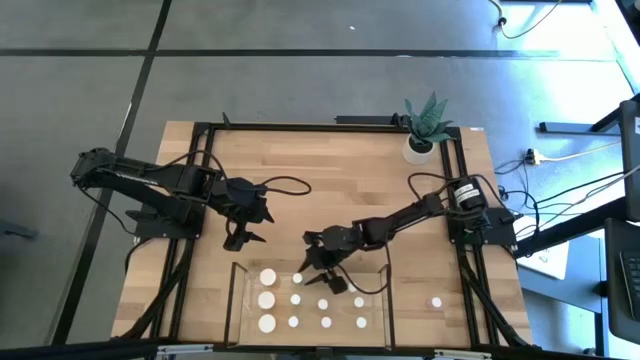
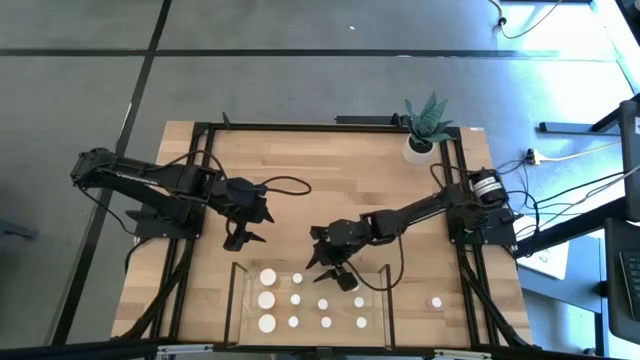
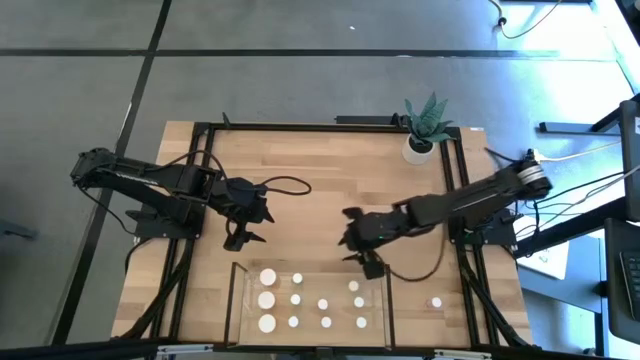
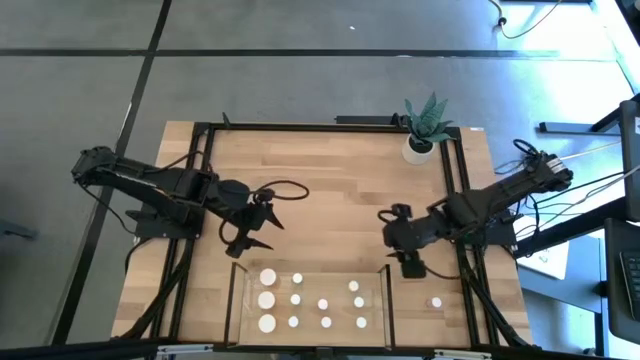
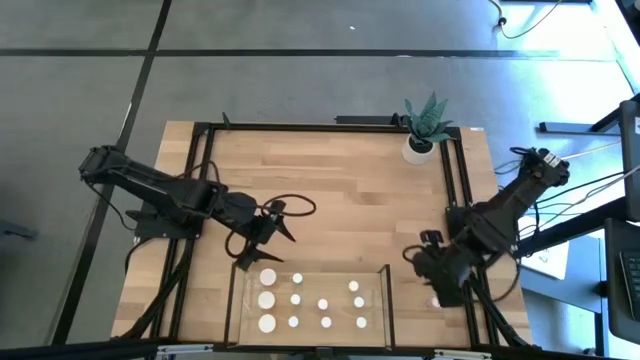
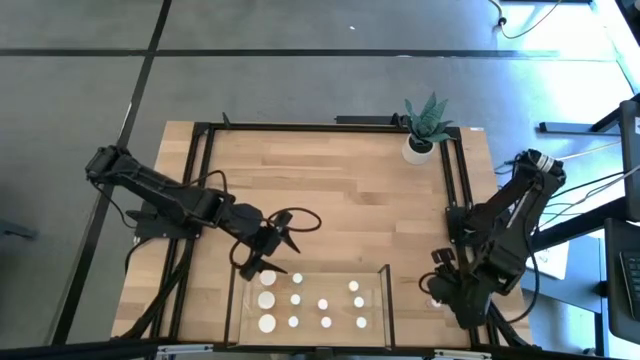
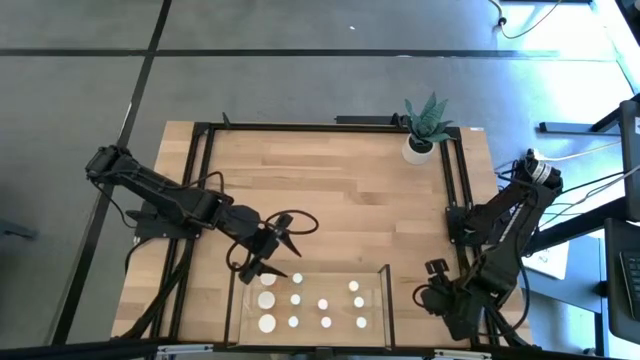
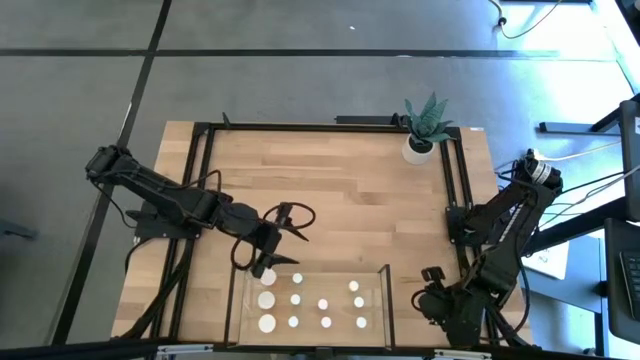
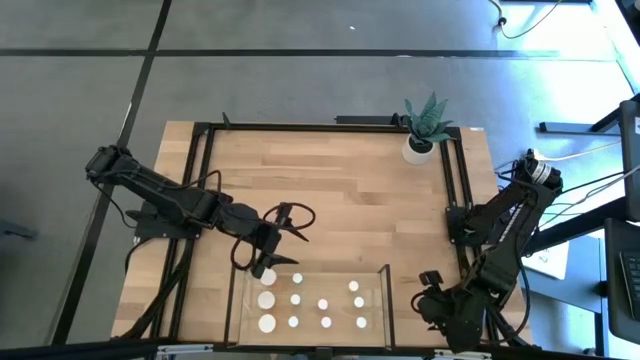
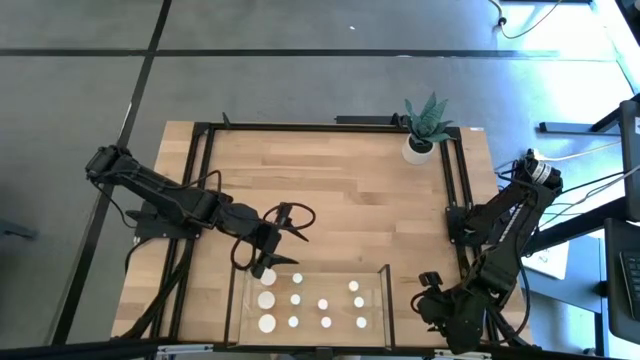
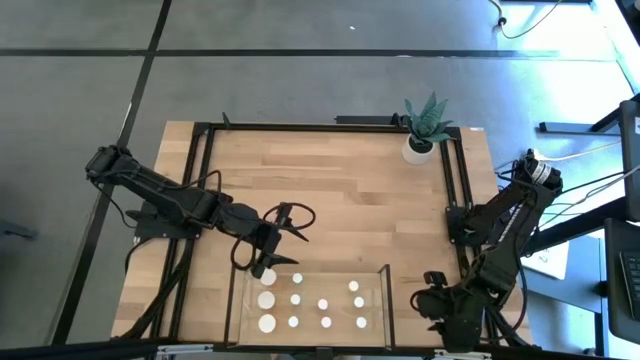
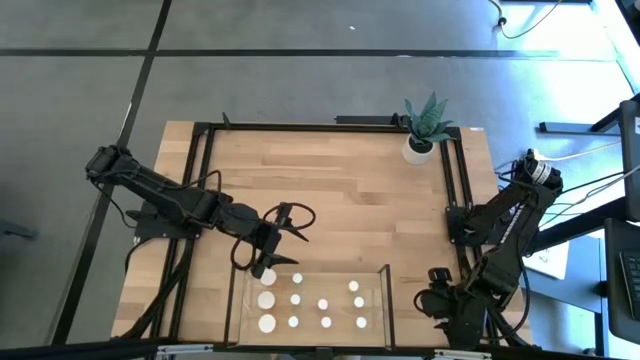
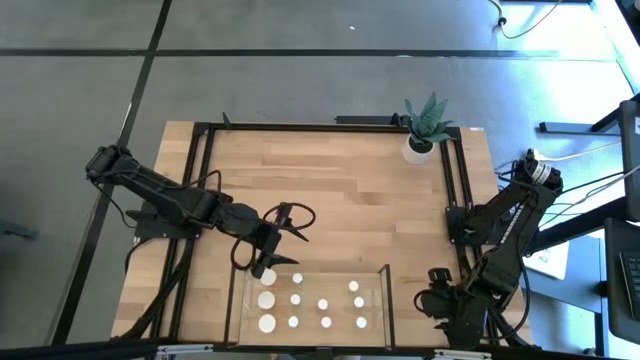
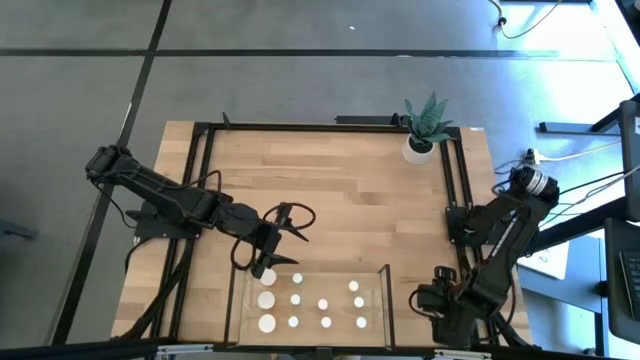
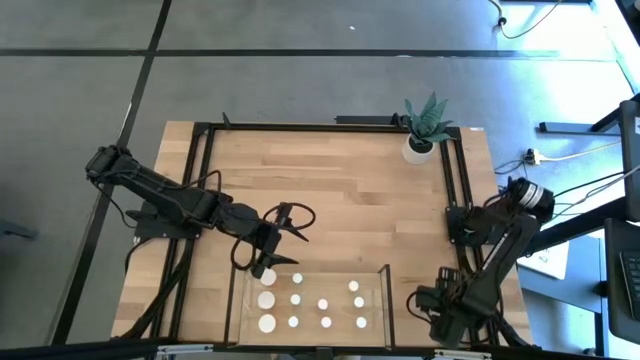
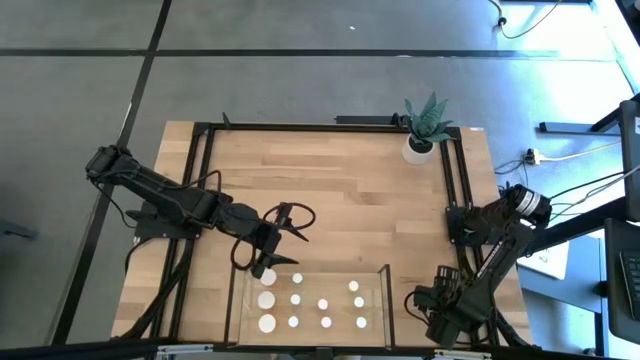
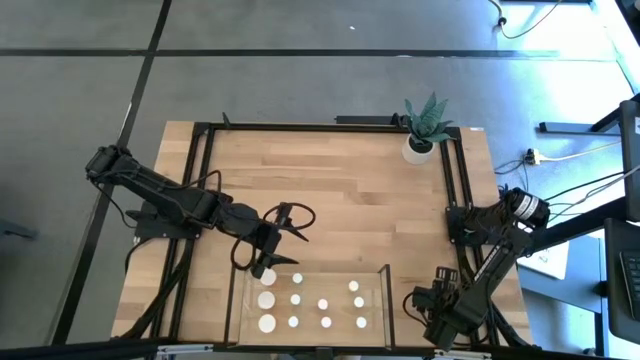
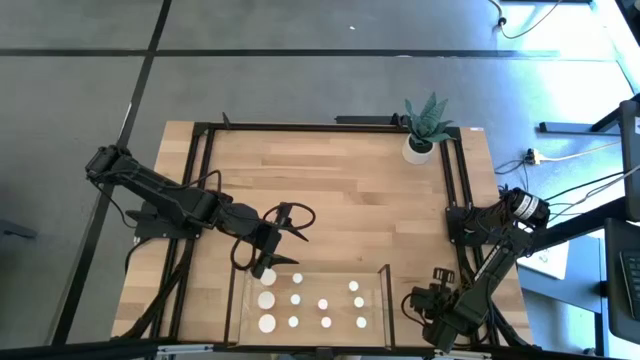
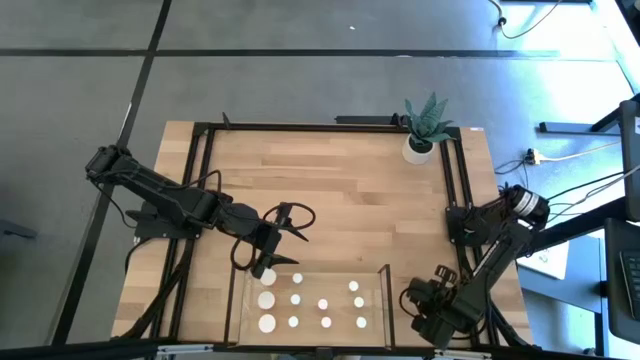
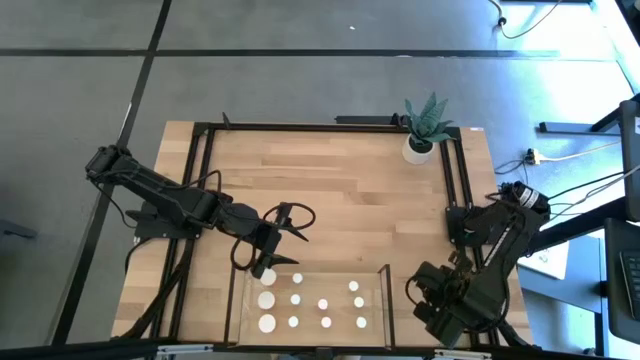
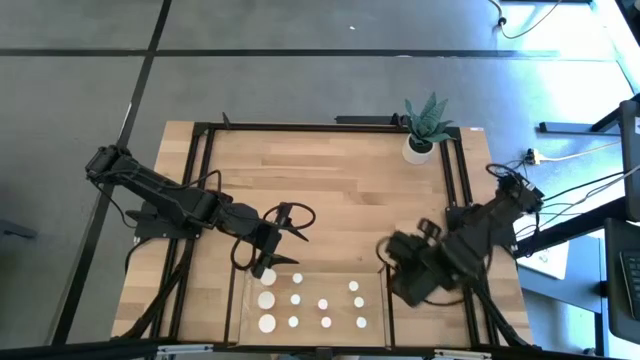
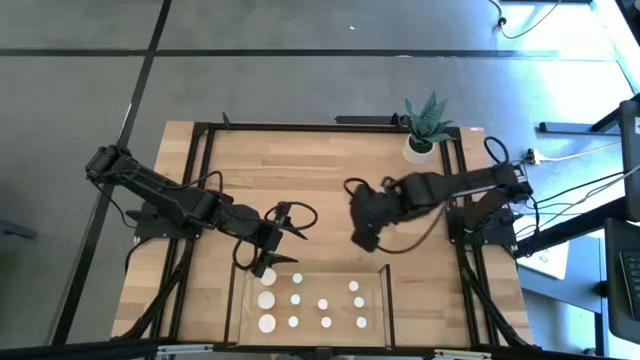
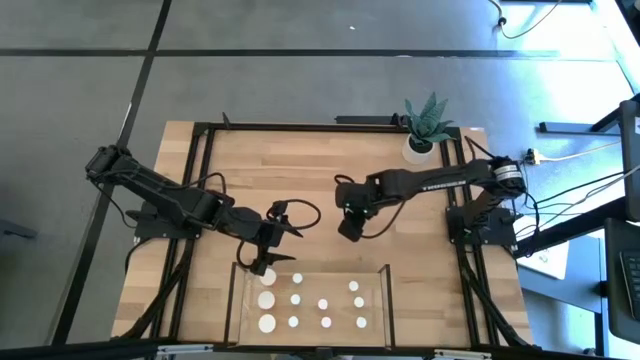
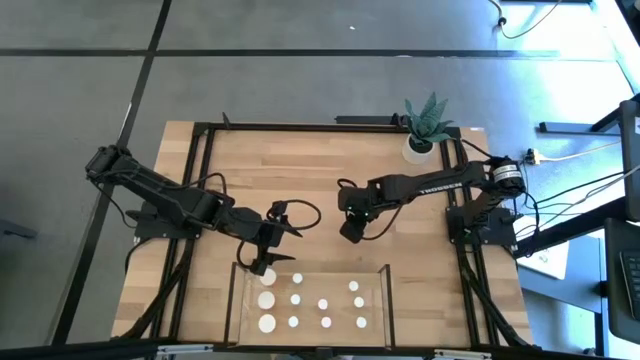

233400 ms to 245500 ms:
Task: Pick and place medicine bottles onto shelf by color
Put the pink pill bottle on the shelf aligned with the other pink pill bottle

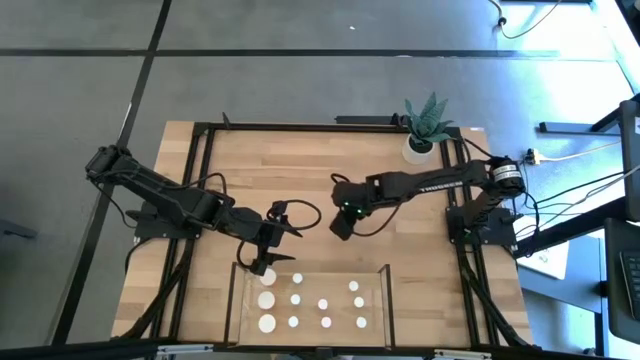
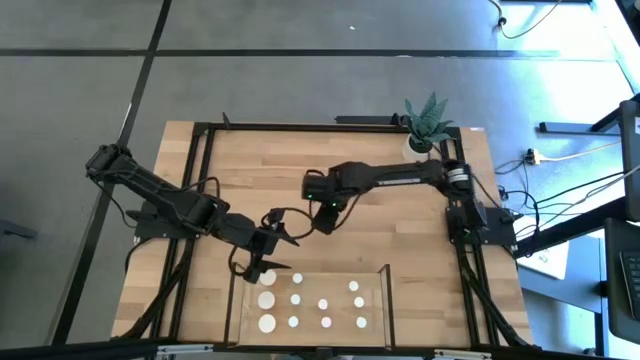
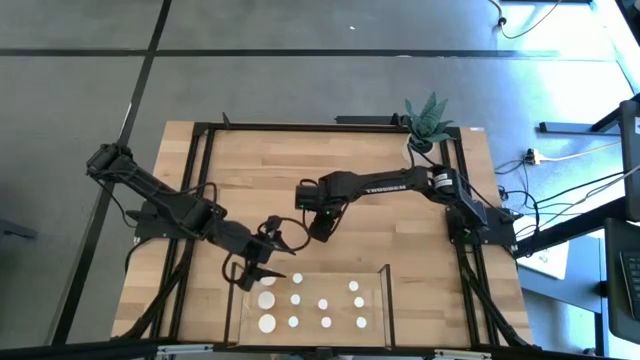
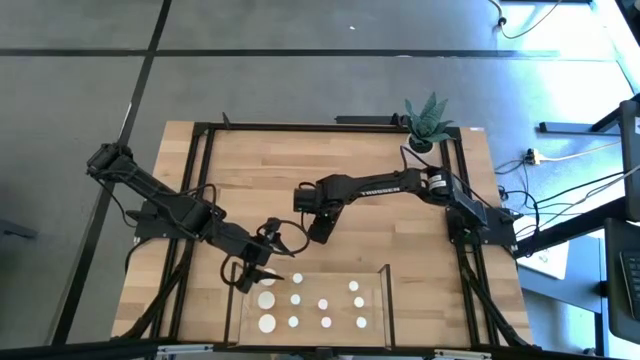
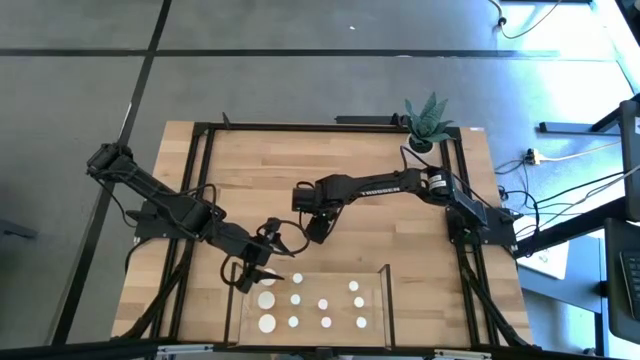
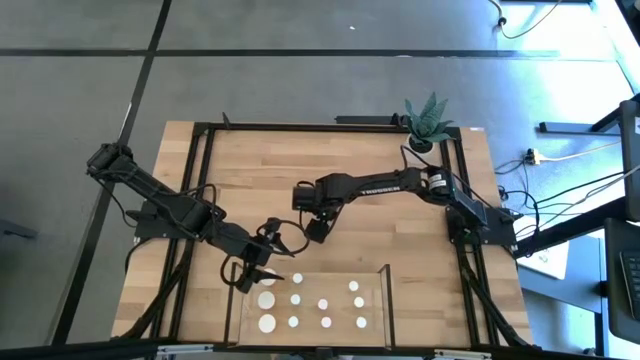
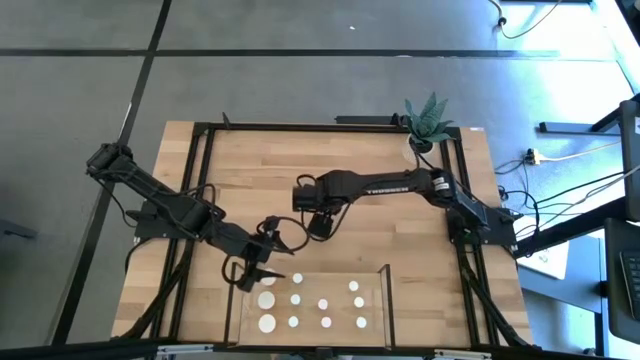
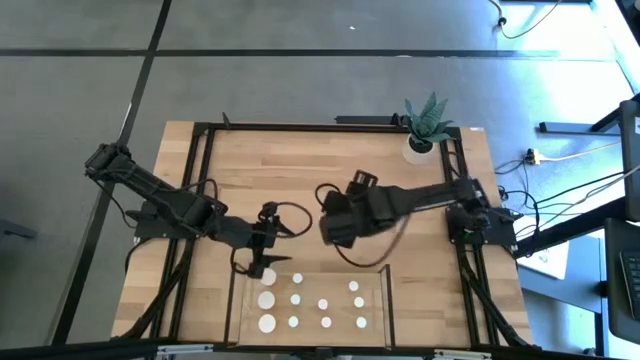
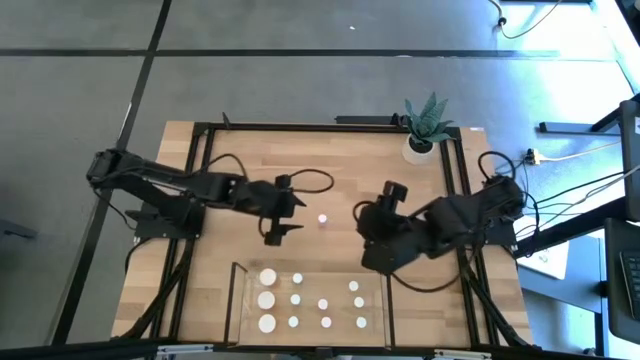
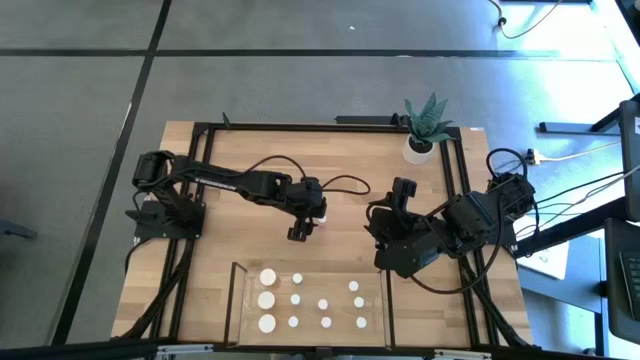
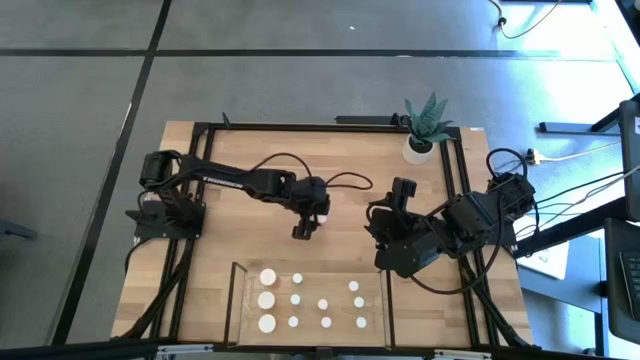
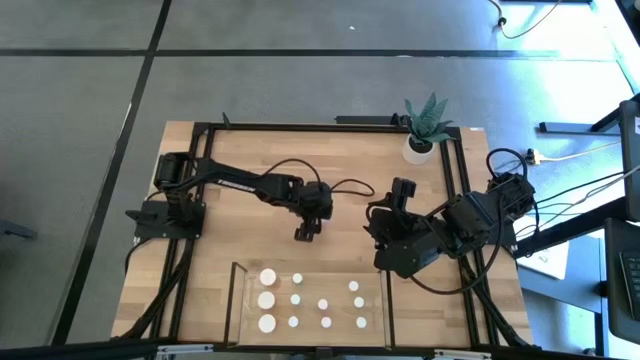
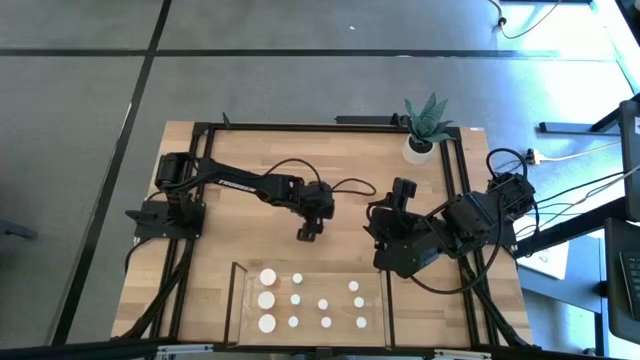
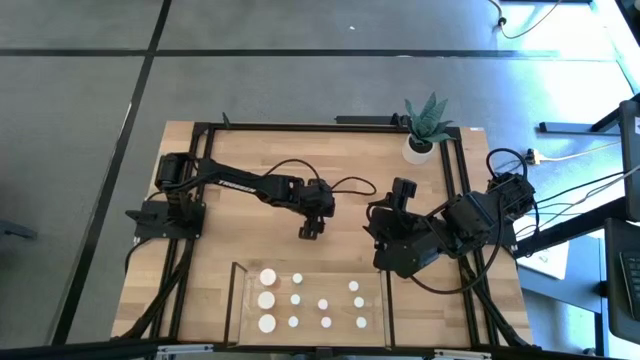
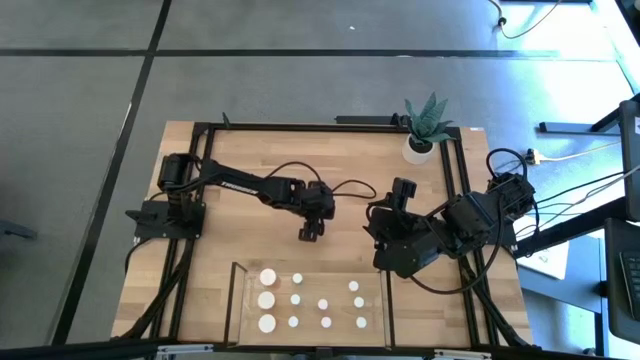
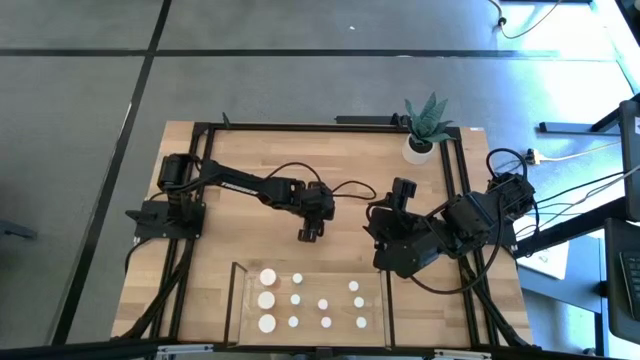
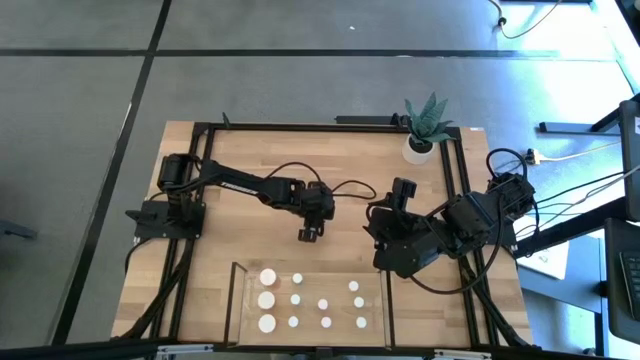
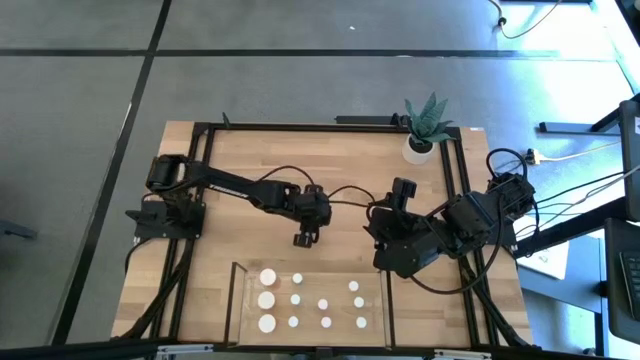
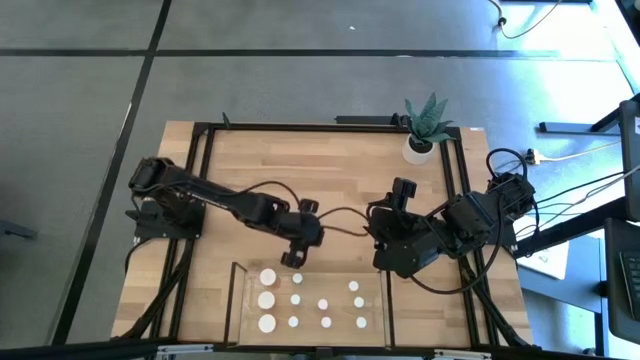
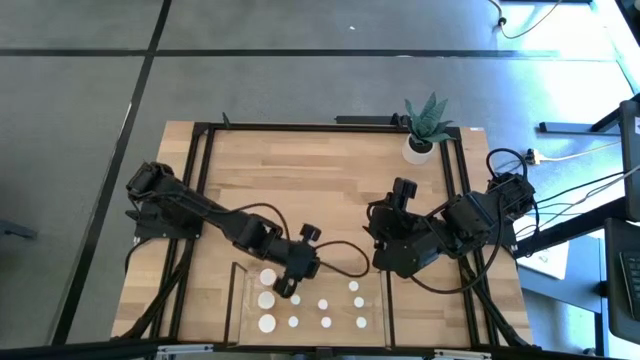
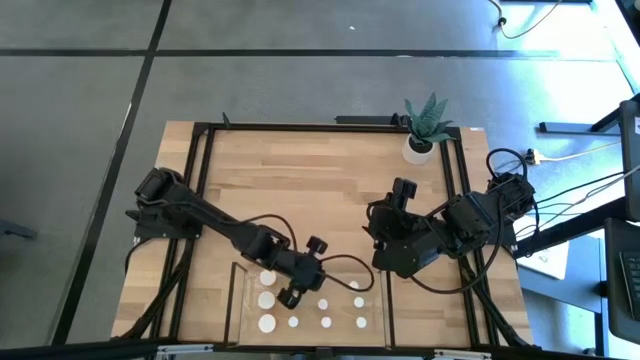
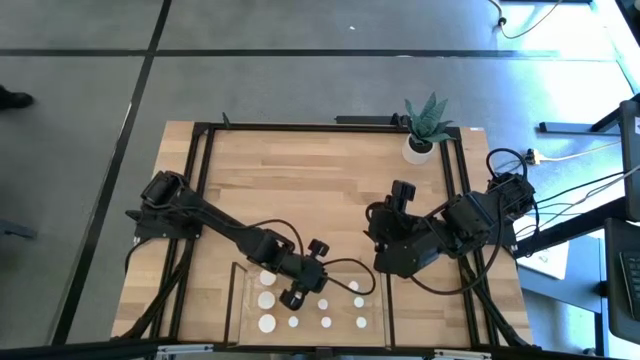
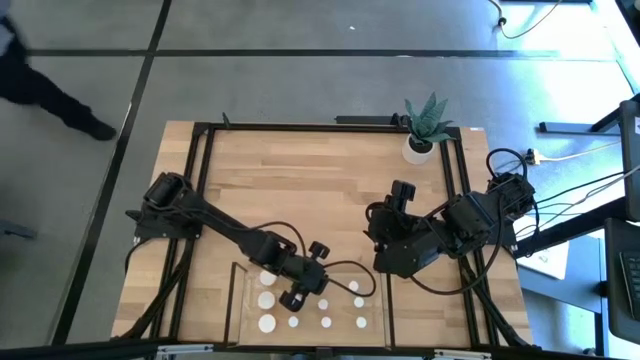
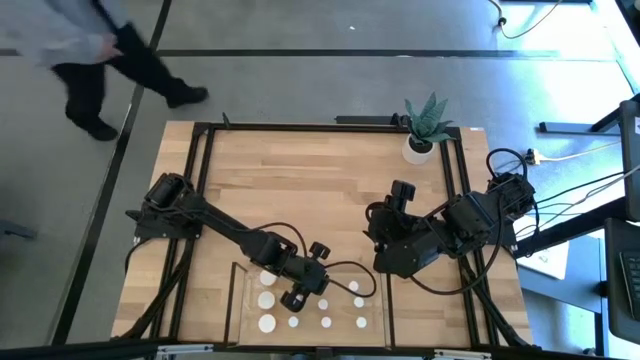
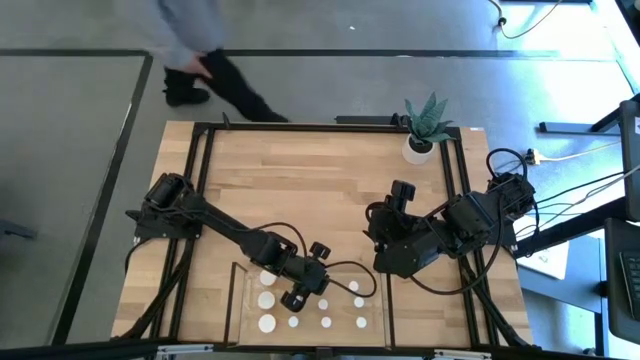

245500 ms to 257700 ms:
Put the pink pill bottle on the shelf aligned with the other pink pill bottle
